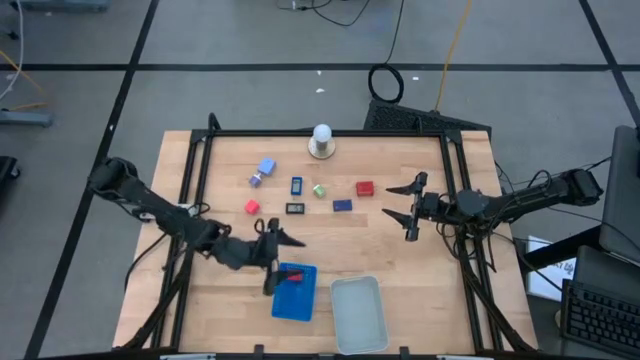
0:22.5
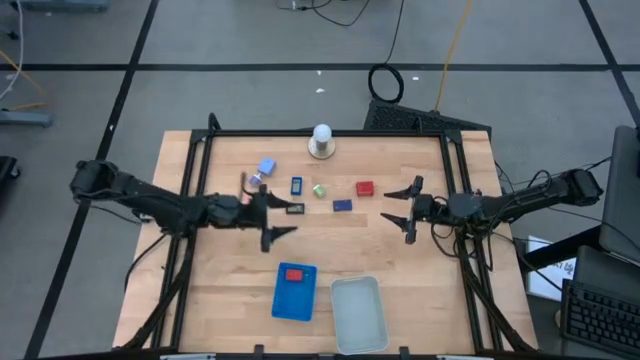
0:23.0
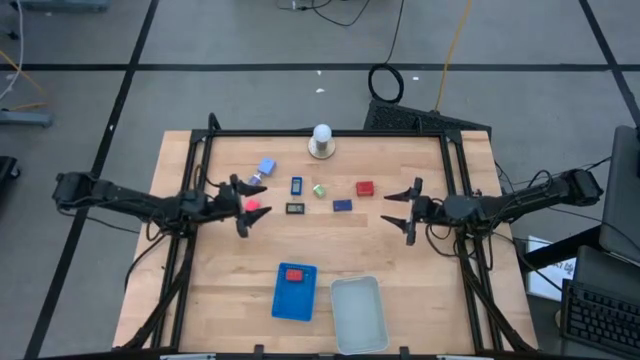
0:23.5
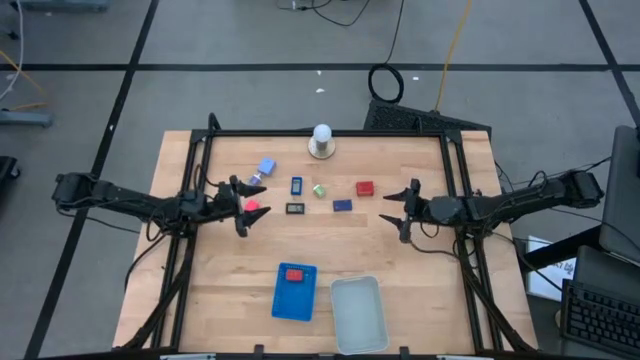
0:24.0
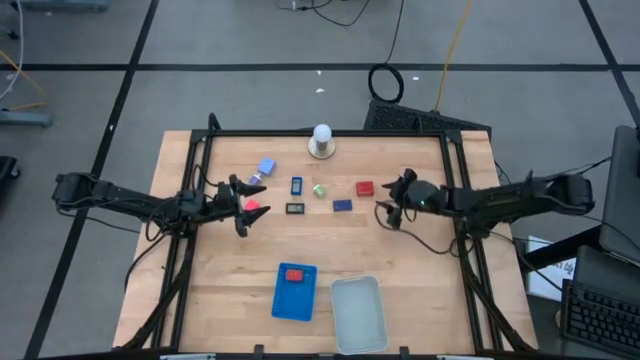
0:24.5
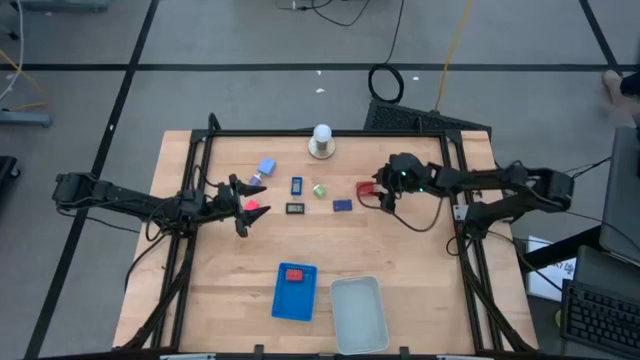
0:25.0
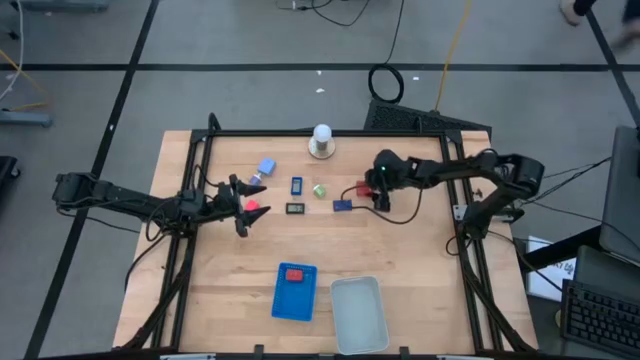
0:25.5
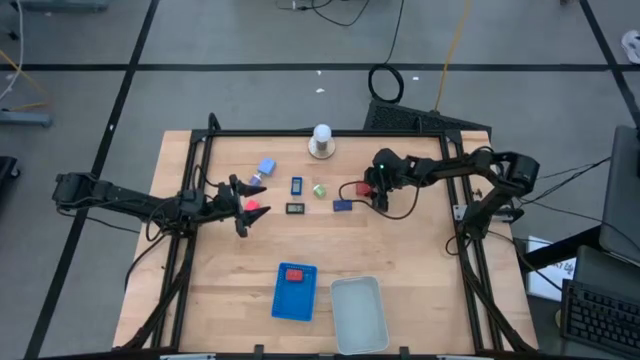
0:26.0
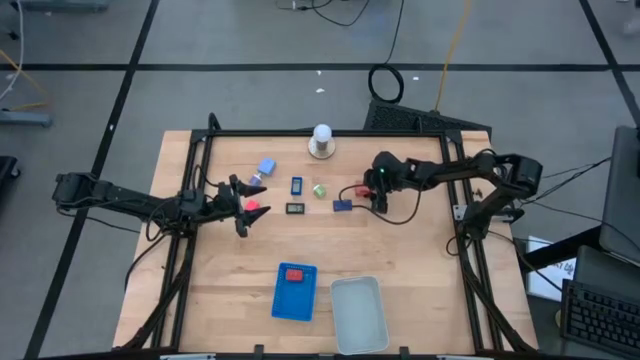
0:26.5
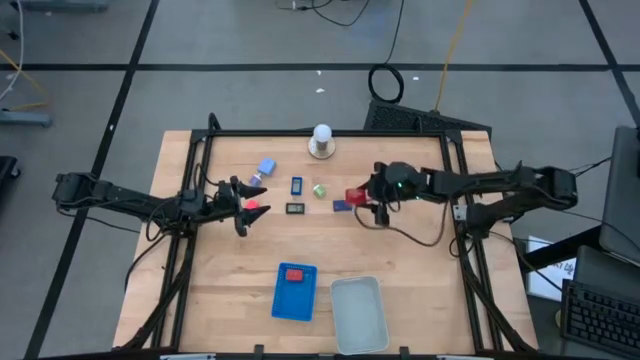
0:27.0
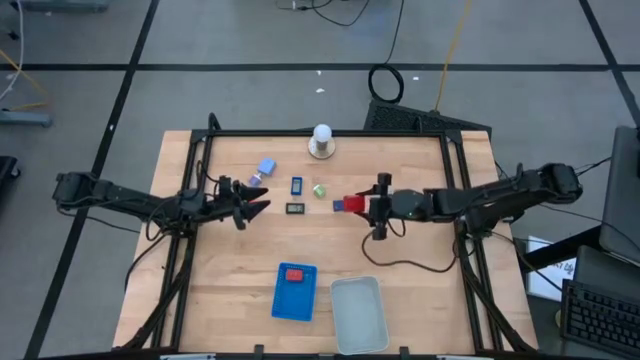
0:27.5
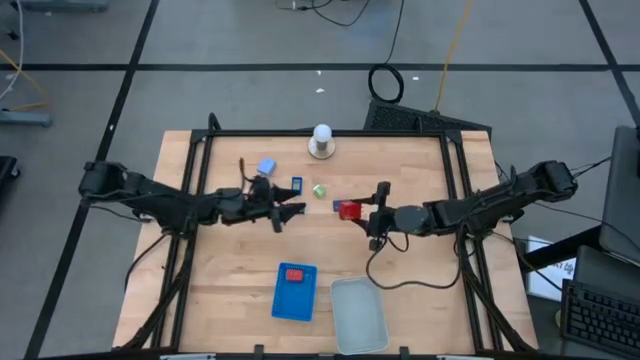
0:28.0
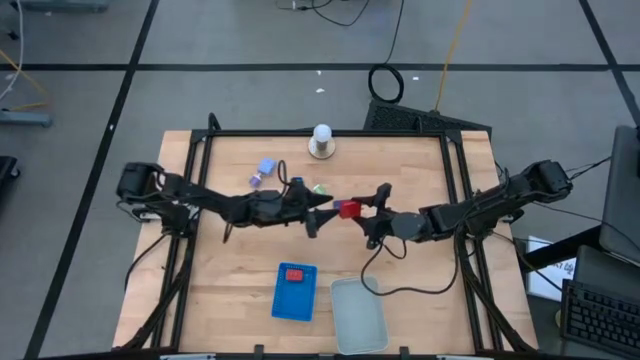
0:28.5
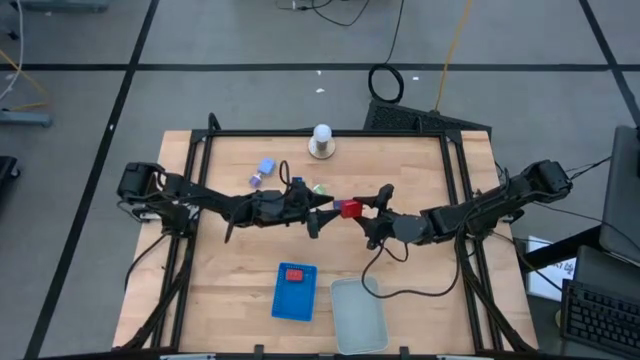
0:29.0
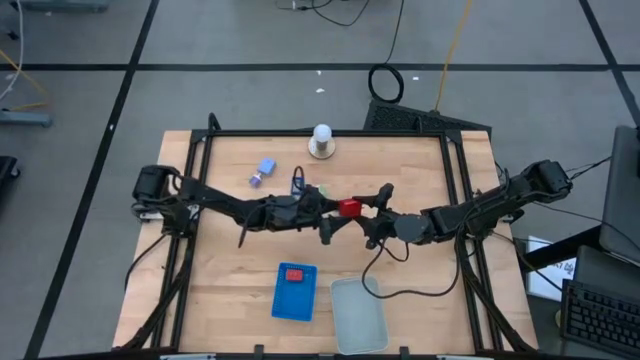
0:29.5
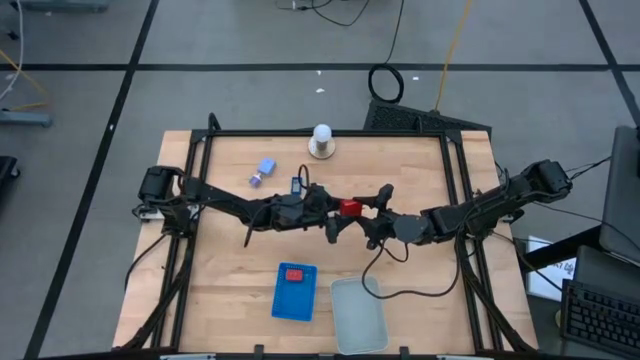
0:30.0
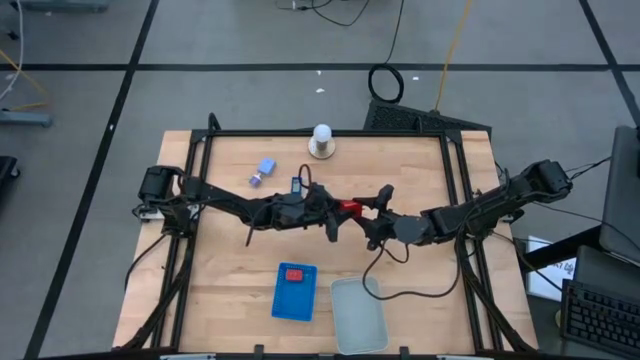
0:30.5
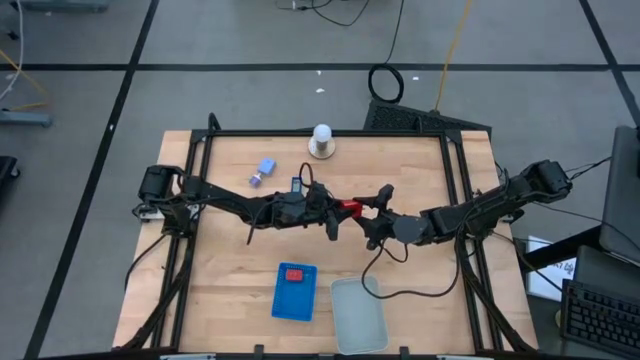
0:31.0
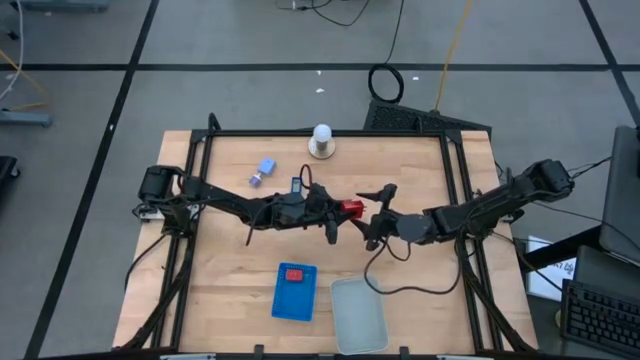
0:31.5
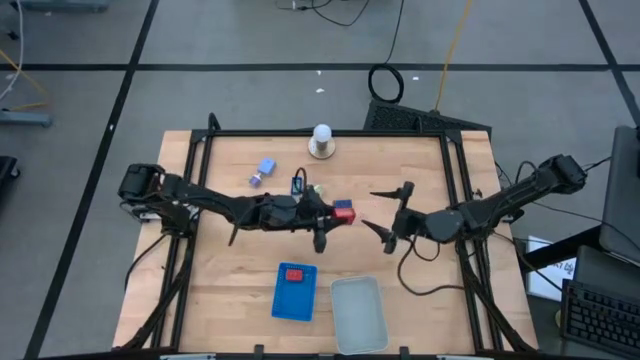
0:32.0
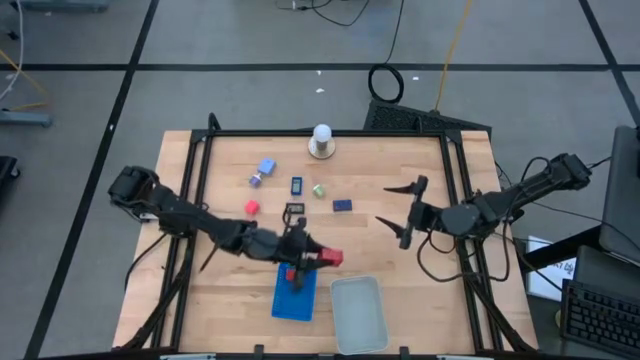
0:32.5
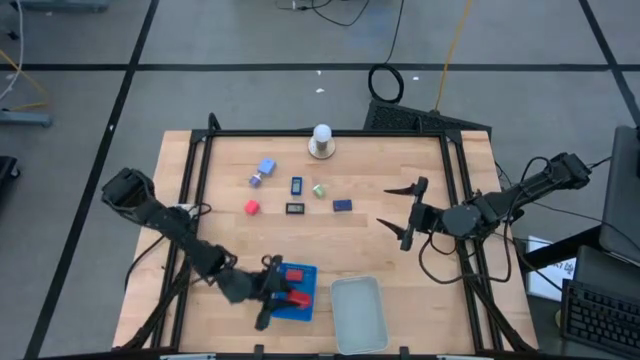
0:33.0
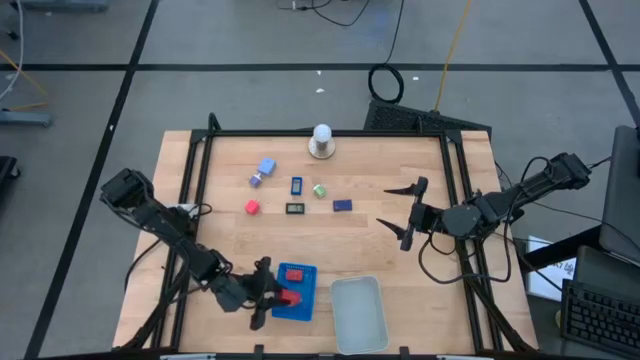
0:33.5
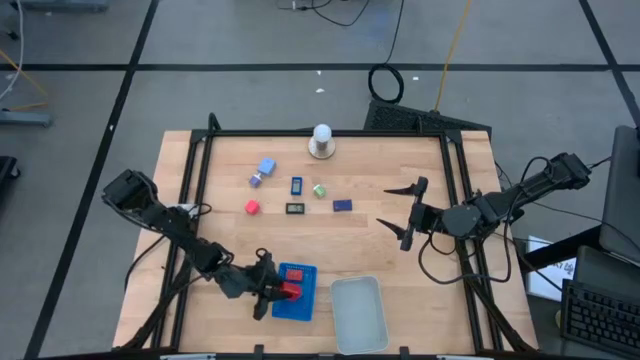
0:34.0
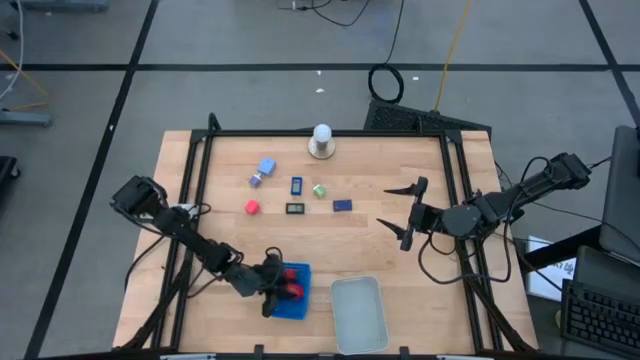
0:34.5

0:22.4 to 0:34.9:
Task: Pick & Place Office items
Put the red charger adapter into the blue bin

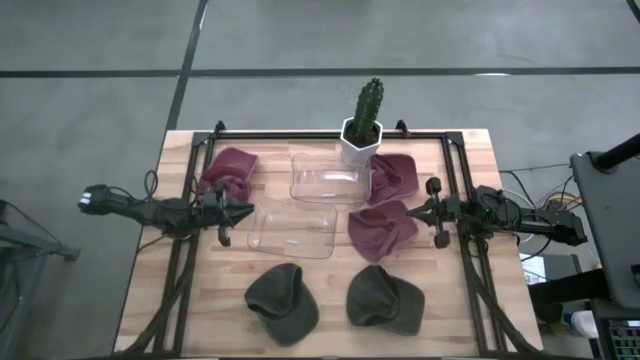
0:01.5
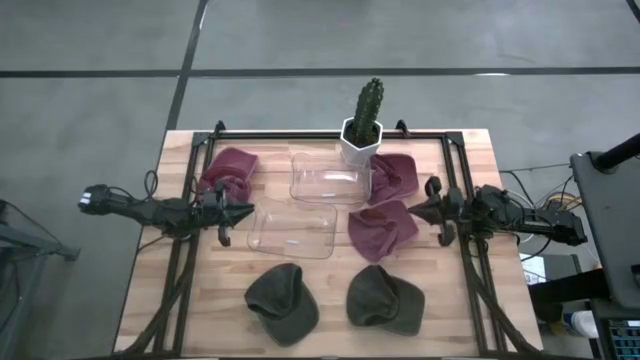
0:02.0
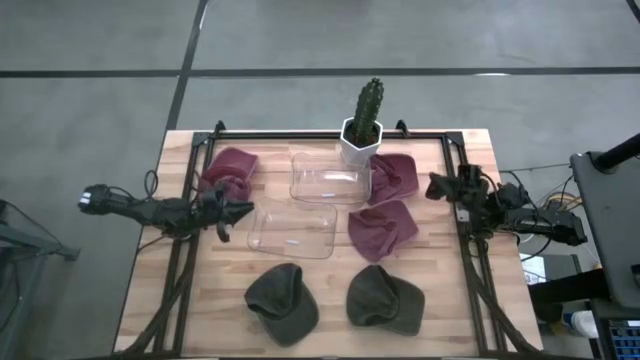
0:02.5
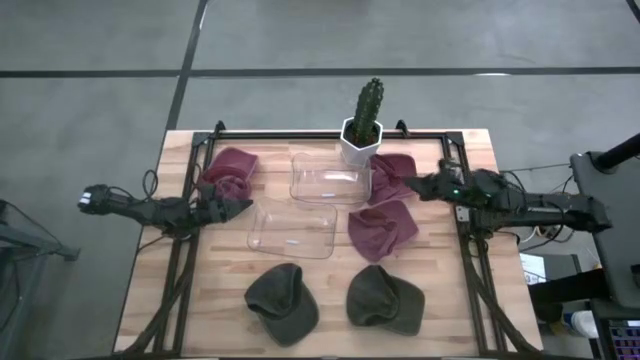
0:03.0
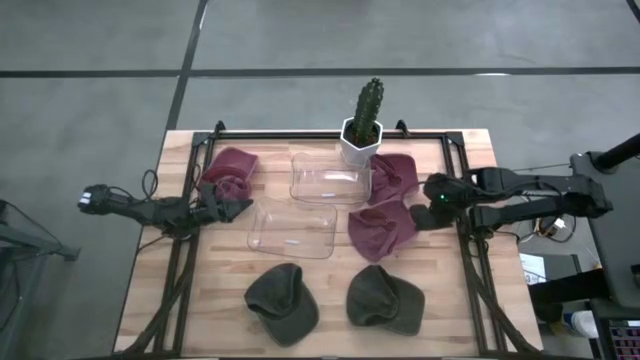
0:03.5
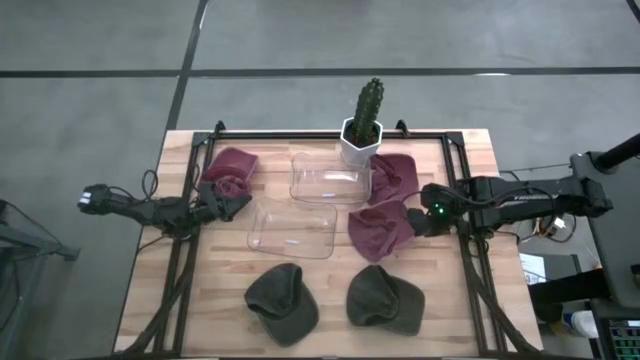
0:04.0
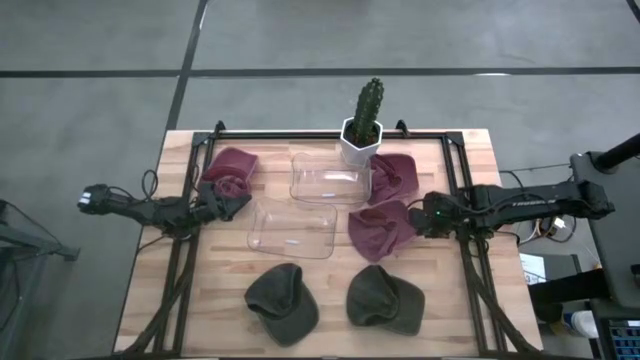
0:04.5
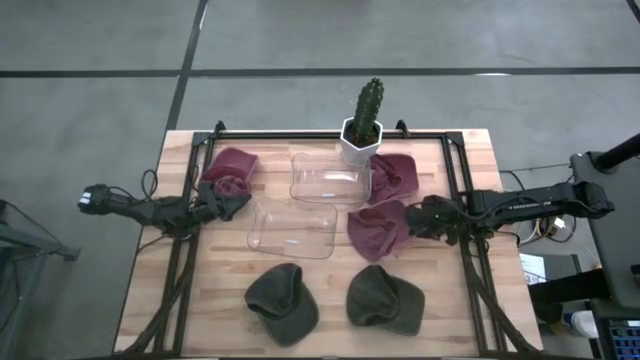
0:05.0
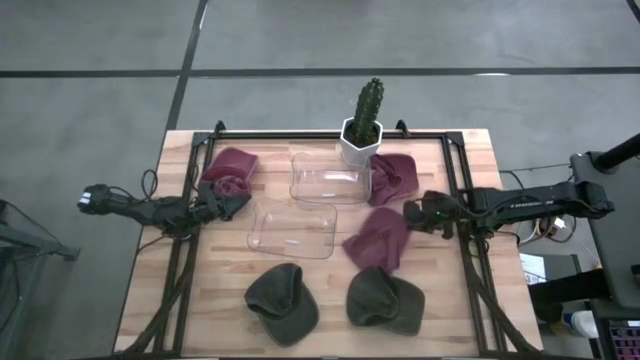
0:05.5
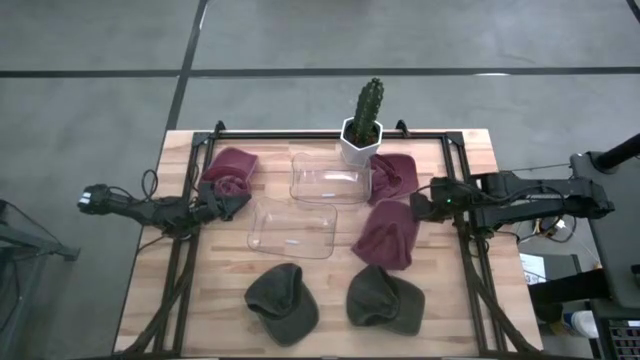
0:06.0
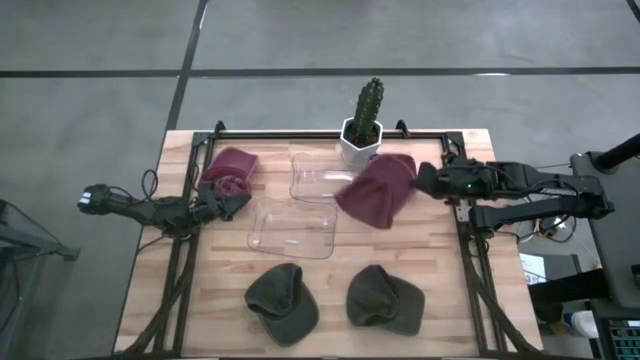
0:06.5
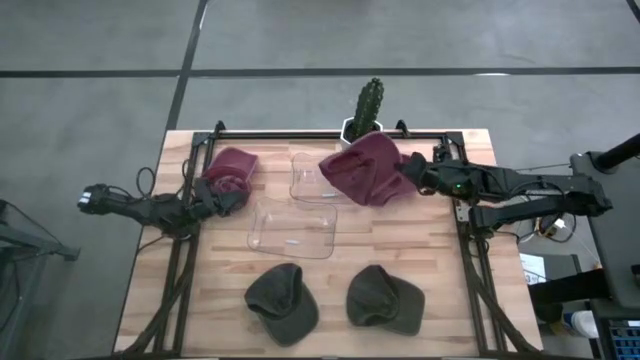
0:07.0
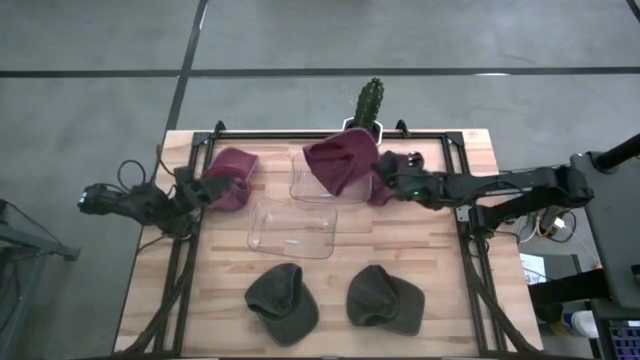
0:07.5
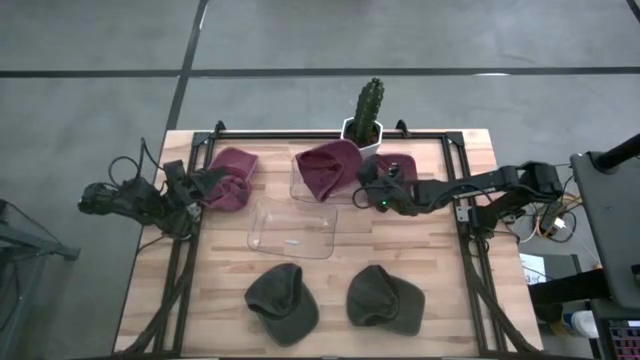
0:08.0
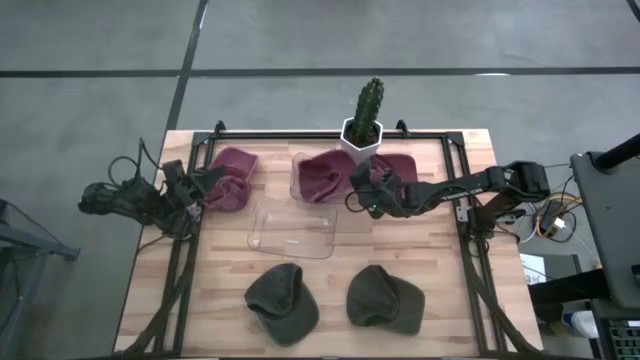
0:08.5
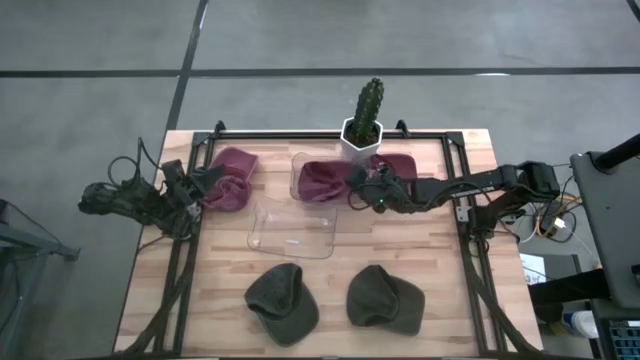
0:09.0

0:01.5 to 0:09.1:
Task: Pick & Place hat
Put the bottom red cap into the top transparent bin
